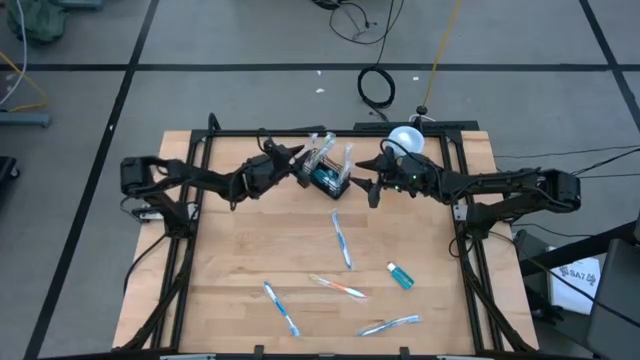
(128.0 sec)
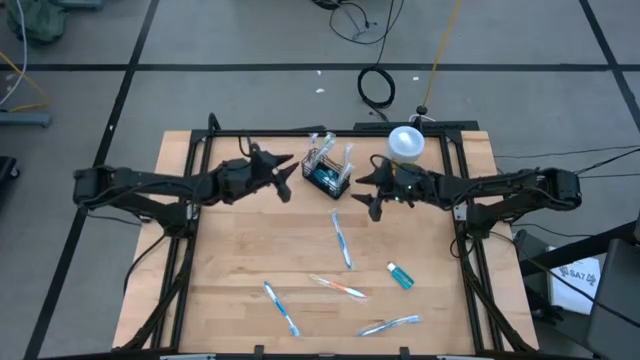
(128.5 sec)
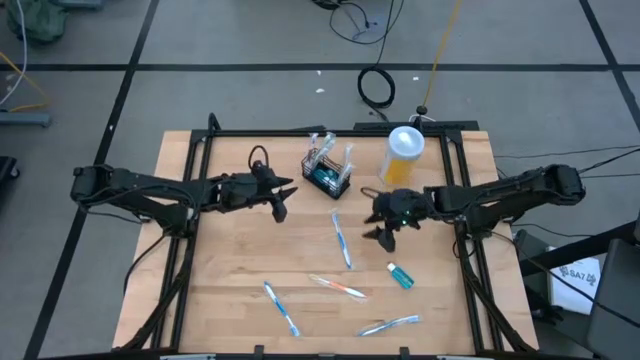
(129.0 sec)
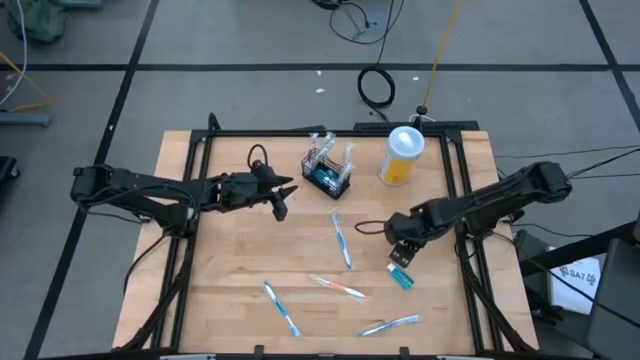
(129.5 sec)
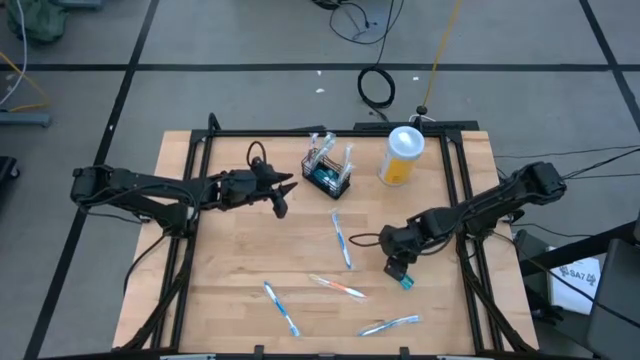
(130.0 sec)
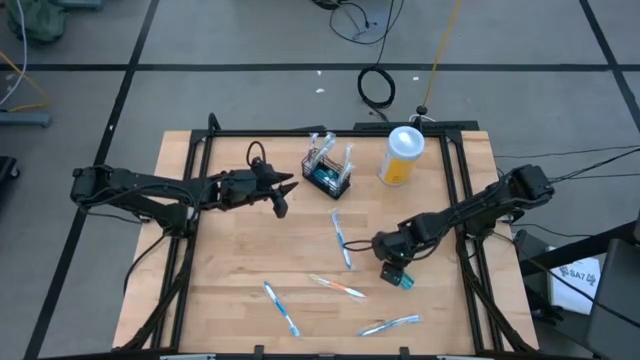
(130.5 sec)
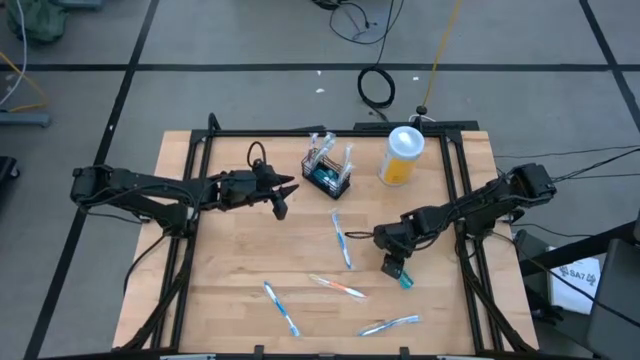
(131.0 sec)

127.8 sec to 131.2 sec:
Task: Pick & Place toothbrushing station
Put the blue mouthwash bottle into the black organizer

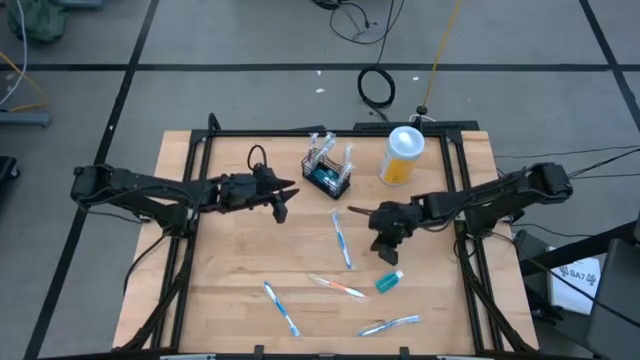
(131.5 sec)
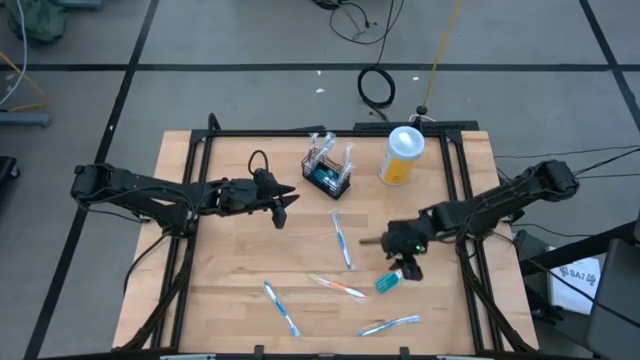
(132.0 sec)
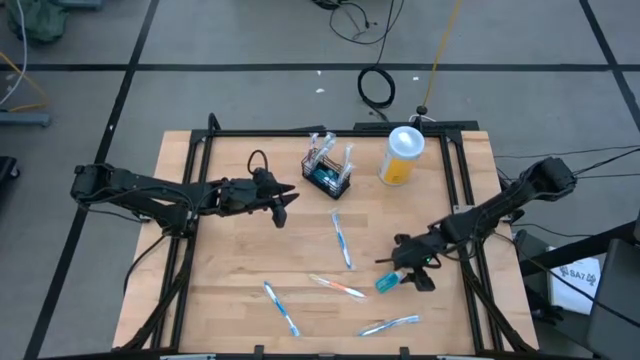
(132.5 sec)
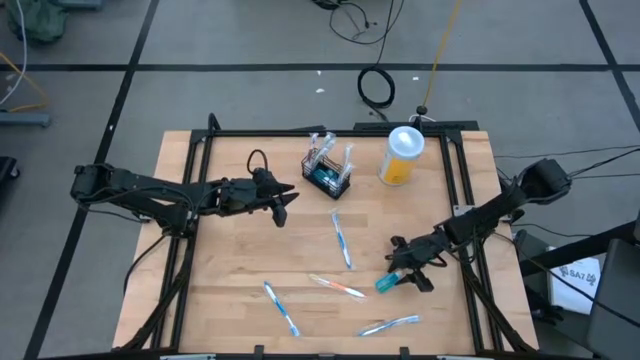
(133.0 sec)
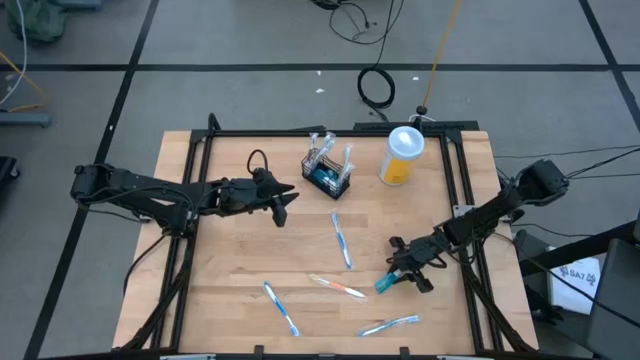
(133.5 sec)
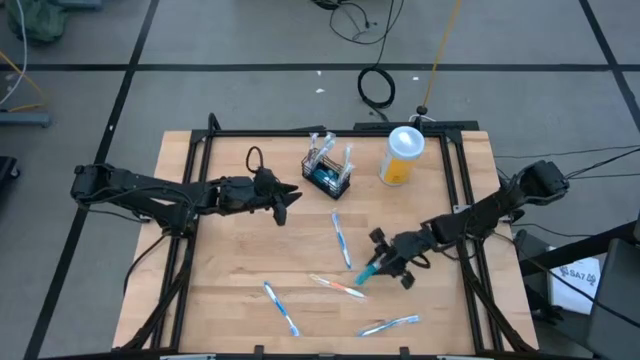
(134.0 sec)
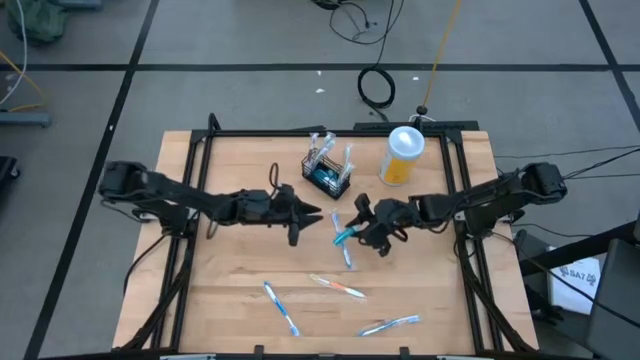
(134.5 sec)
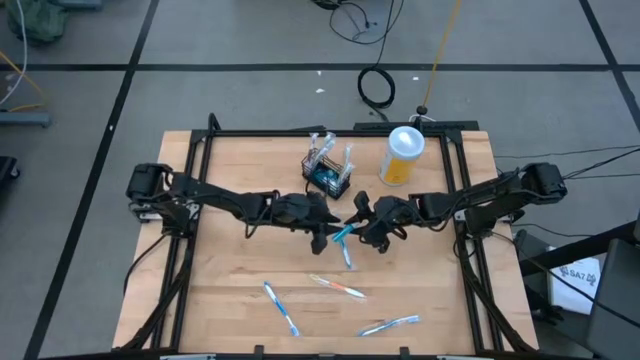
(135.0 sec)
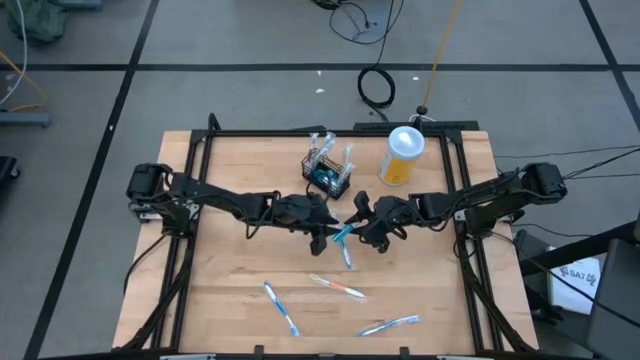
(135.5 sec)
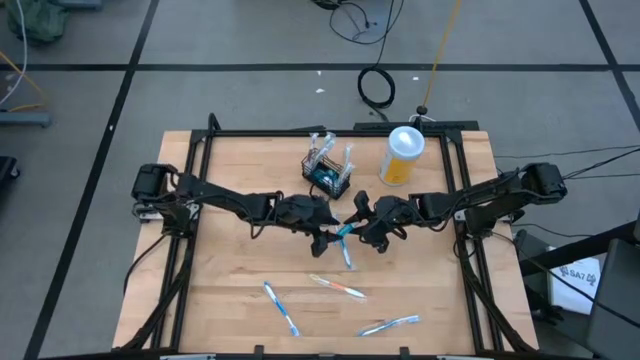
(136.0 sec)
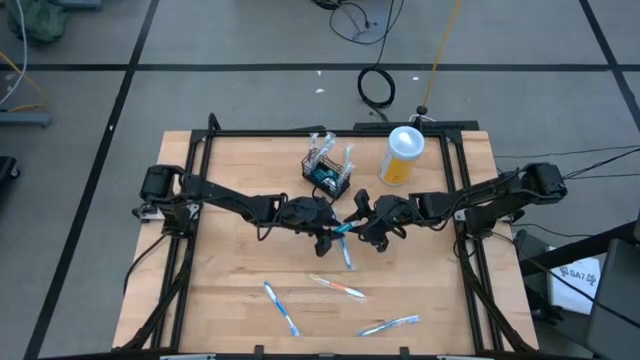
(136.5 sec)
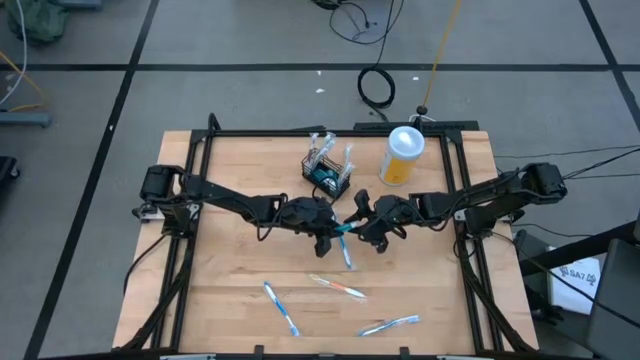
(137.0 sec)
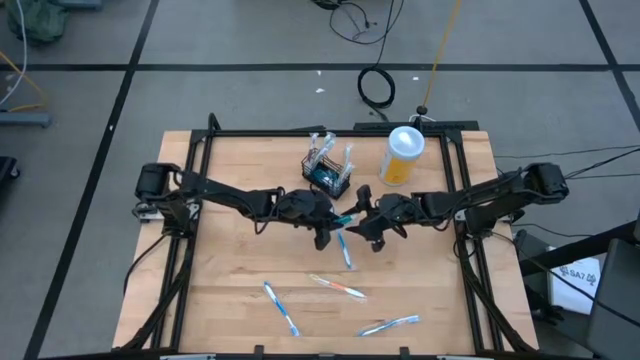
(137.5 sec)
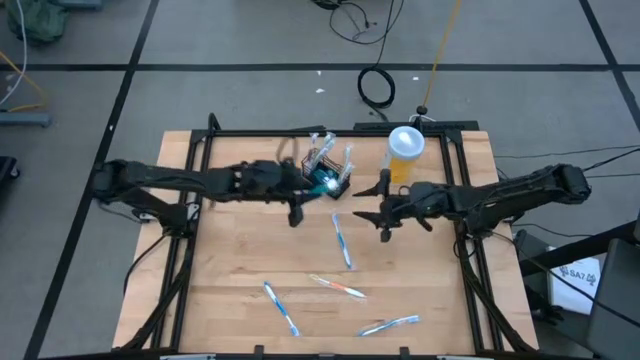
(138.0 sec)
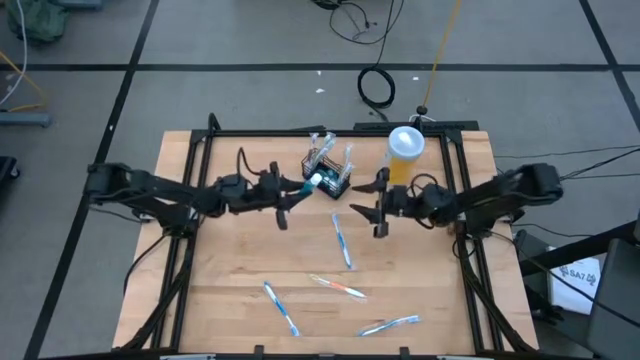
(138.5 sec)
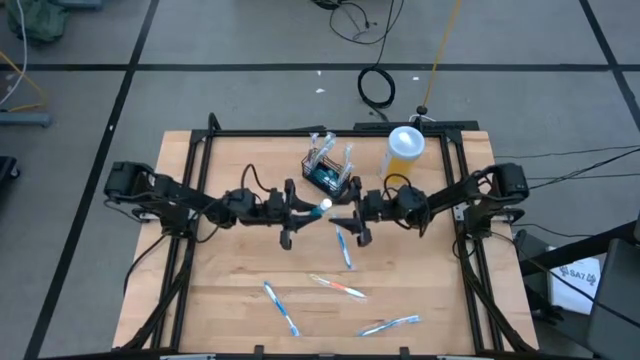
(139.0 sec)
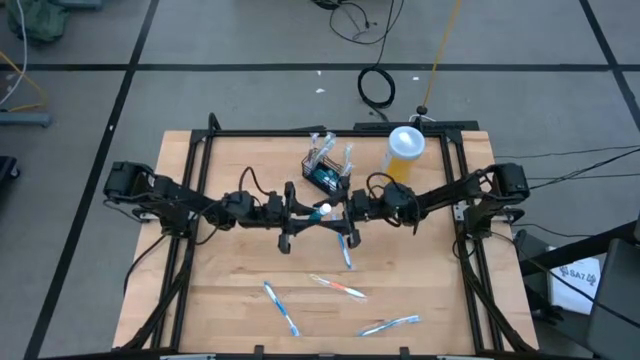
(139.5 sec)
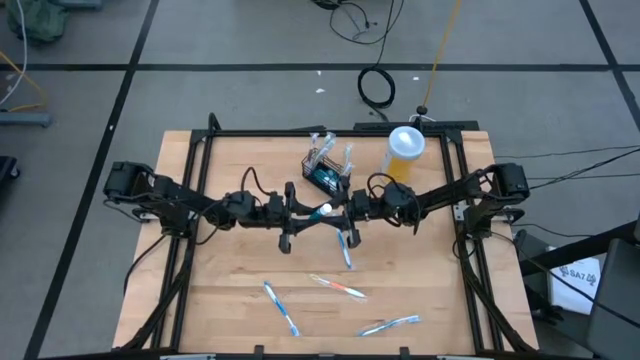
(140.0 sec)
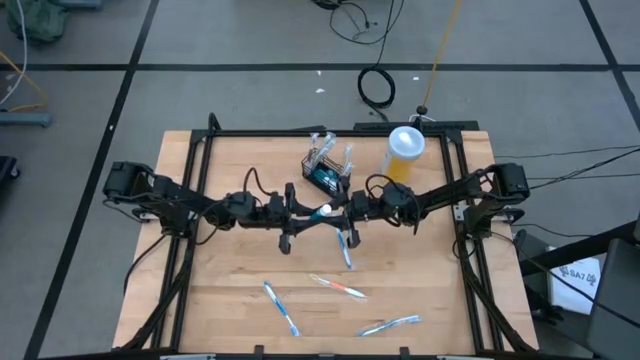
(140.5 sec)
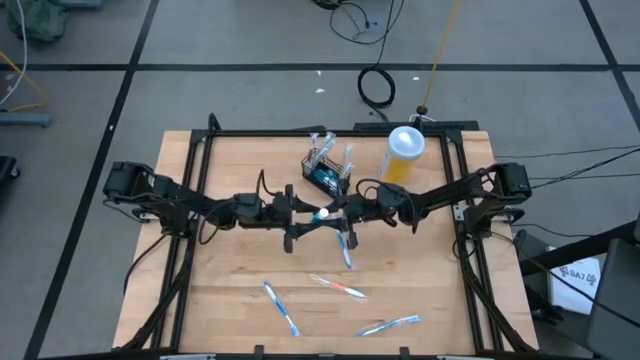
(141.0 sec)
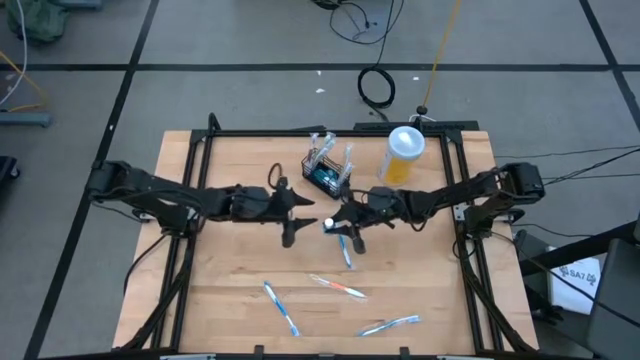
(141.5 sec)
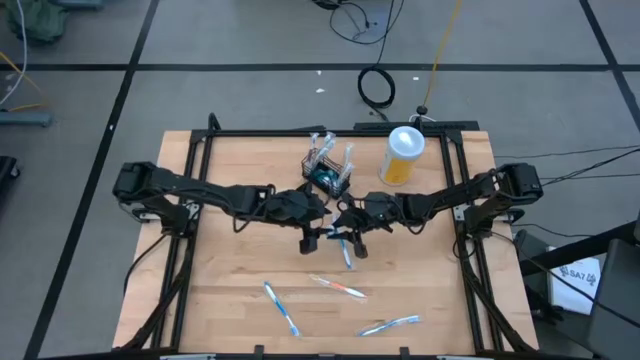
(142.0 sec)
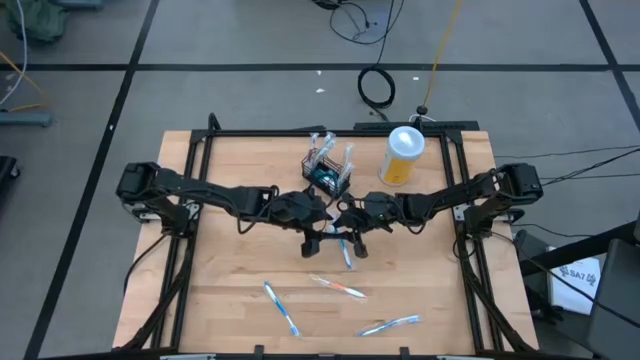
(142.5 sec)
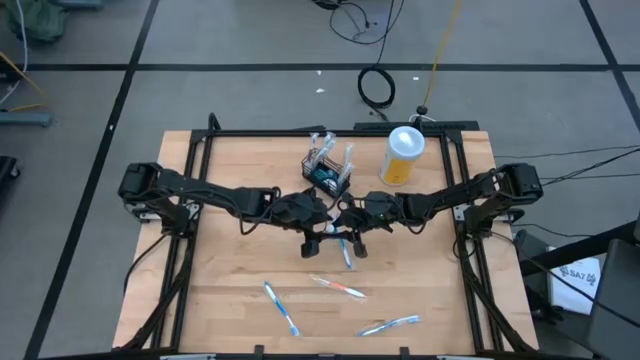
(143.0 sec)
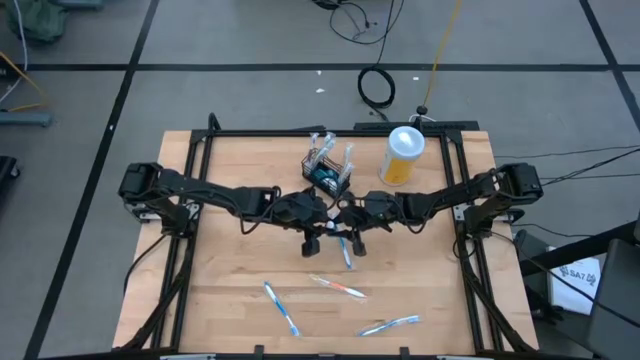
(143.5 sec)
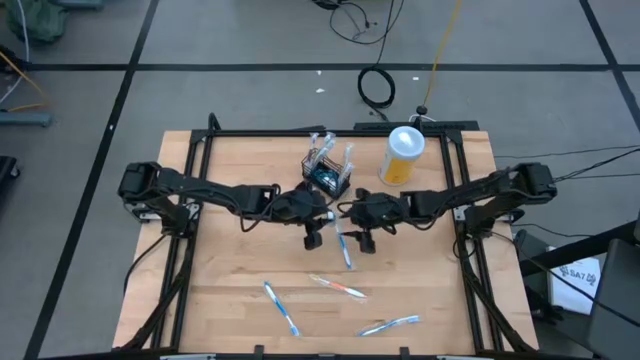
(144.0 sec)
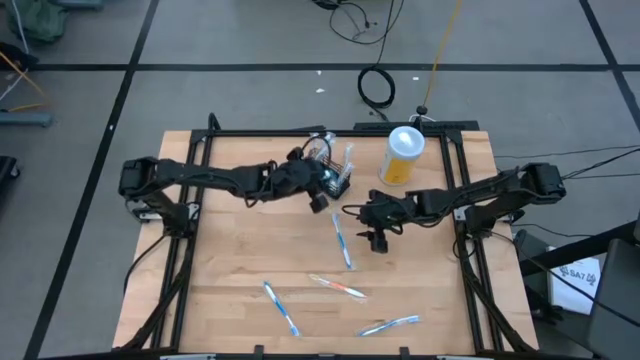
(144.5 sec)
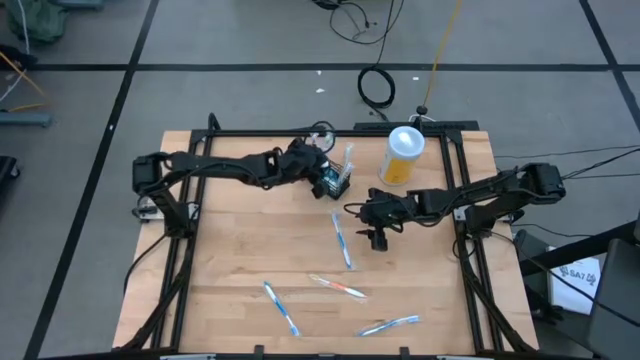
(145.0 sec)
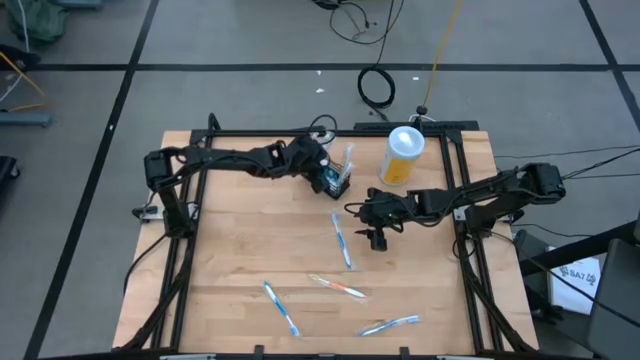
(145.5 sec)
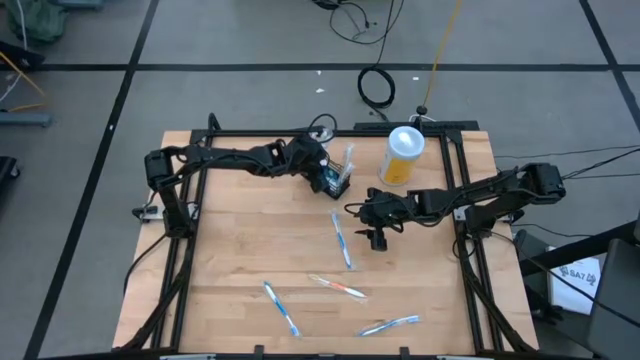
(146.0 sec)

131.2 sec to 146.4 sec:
Put the blue mouthwash bottle into the black organizer

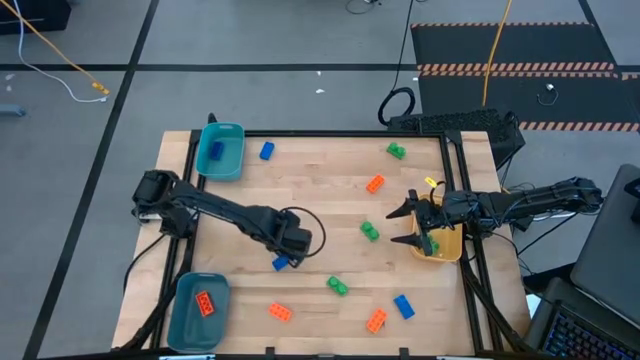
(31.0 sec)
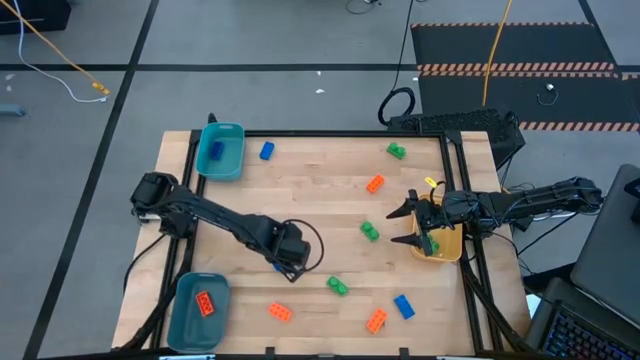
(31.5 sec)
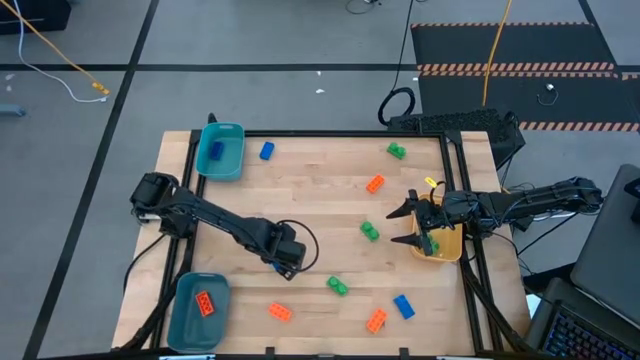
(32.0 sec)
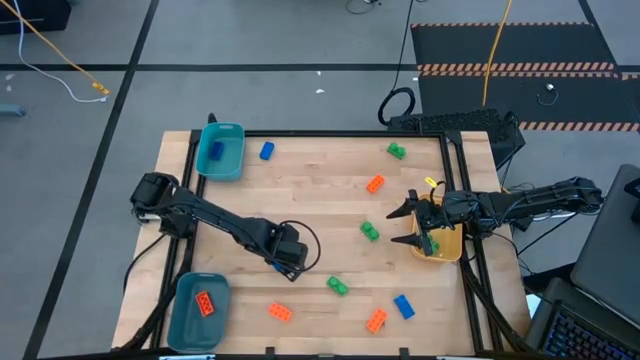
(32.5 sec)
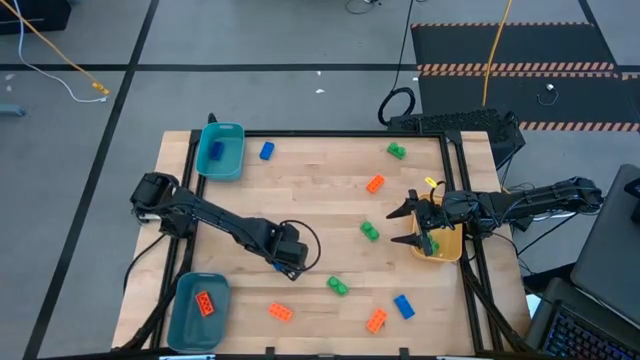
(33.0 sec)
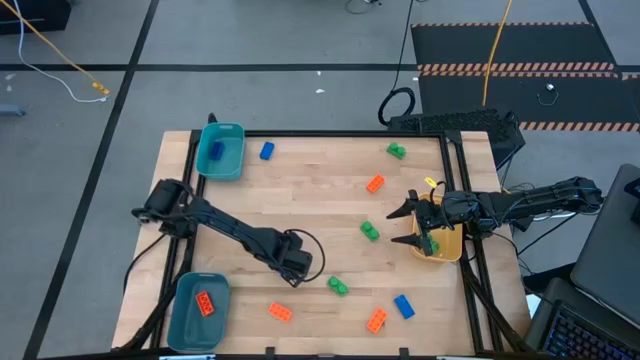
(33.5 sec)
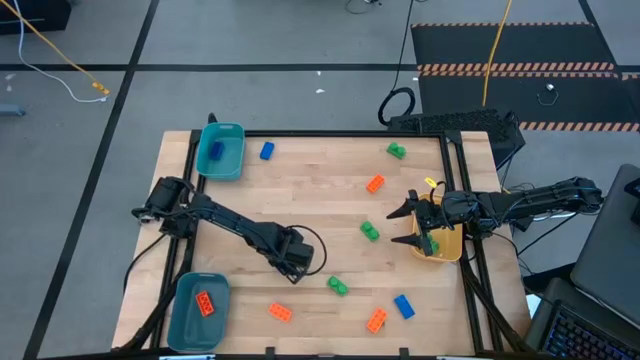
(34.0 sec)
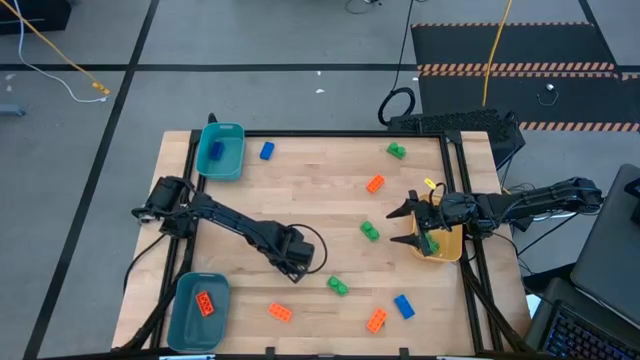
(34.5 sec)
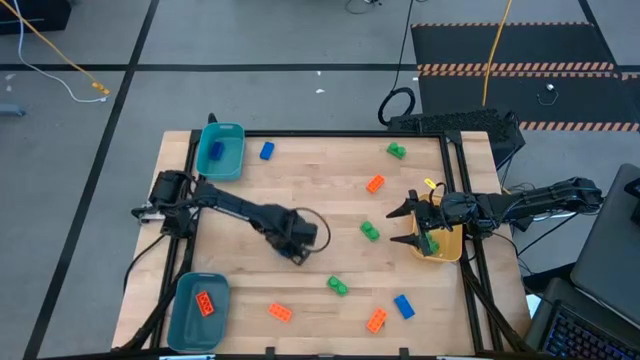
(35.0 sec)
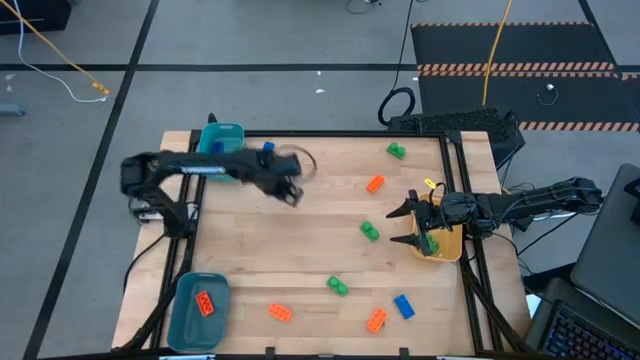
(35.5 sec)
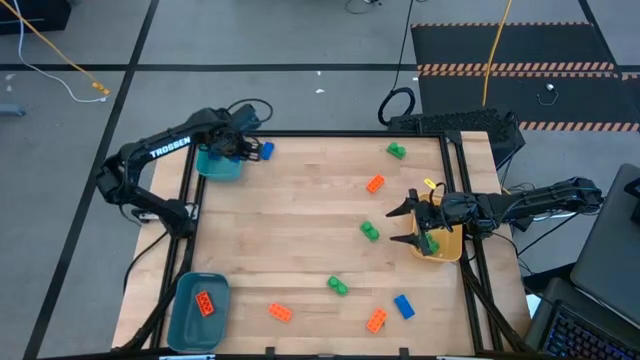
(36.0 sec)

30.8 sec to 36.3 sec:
Task: Sort & place blocks by color
Put the blue game piece into the light blue bin
